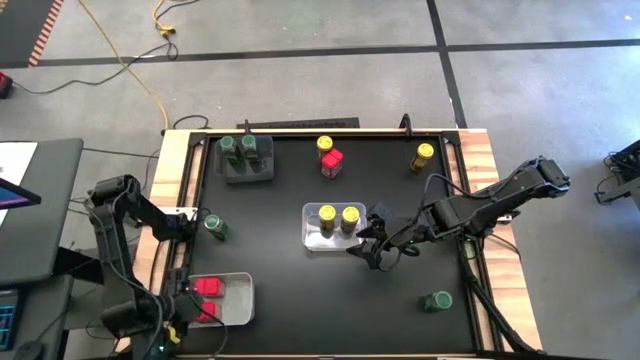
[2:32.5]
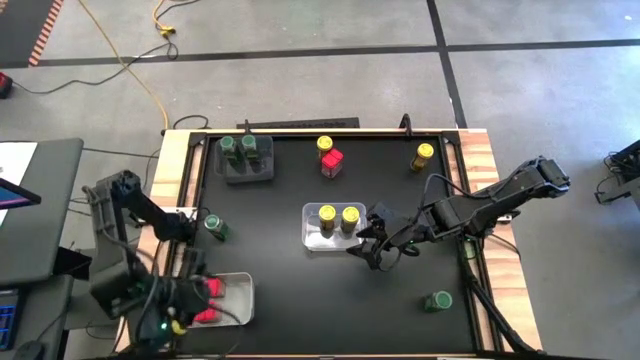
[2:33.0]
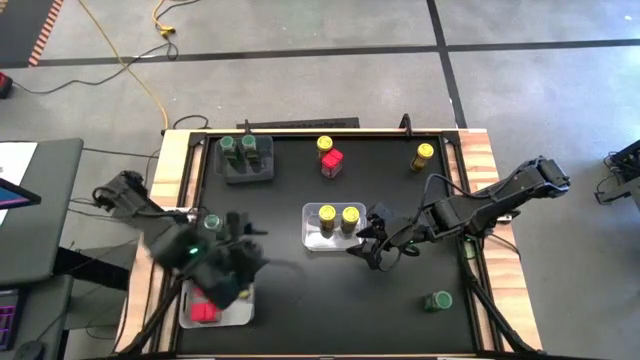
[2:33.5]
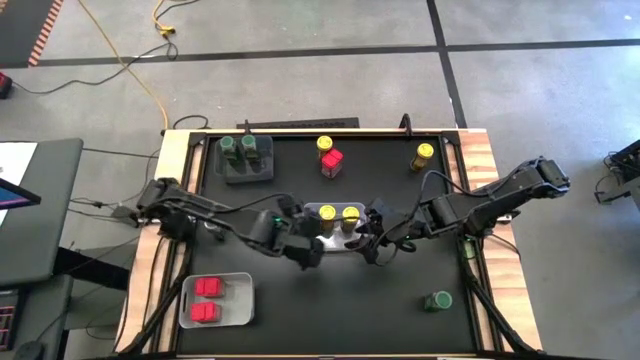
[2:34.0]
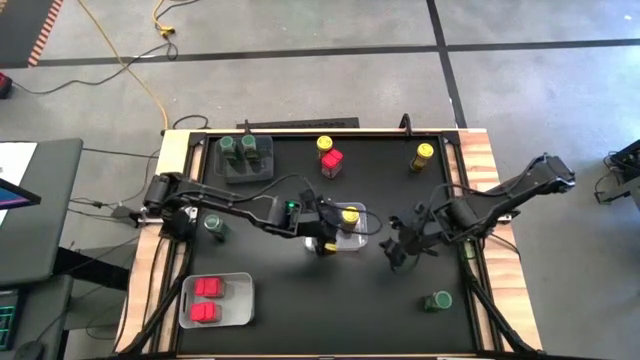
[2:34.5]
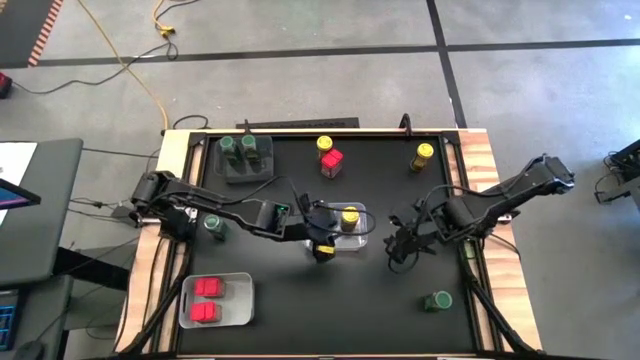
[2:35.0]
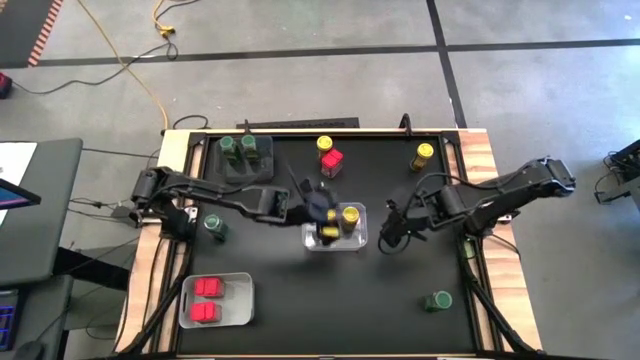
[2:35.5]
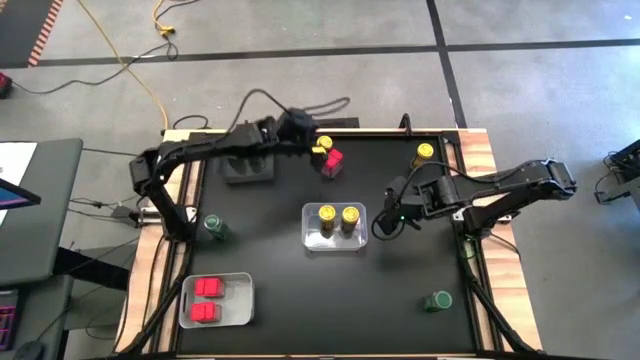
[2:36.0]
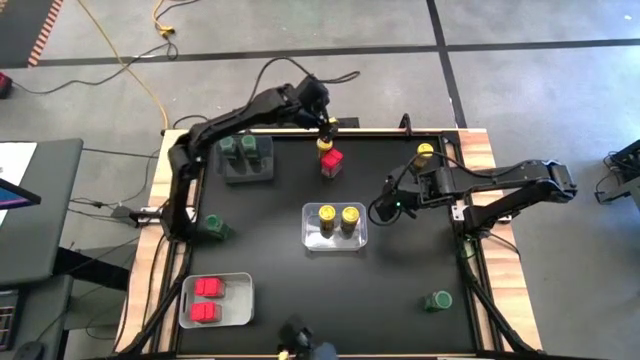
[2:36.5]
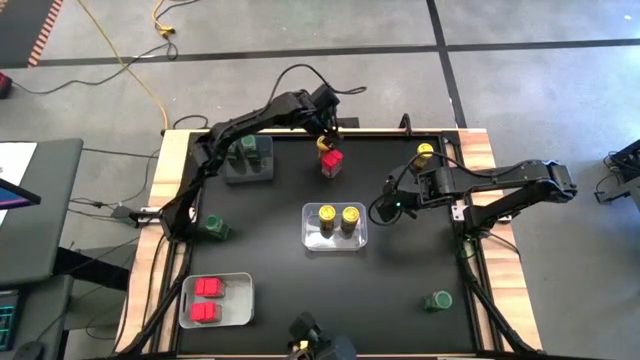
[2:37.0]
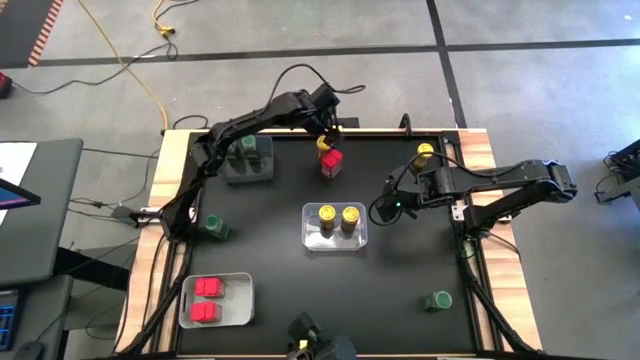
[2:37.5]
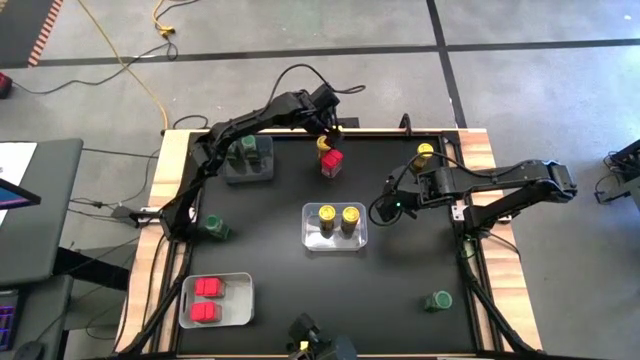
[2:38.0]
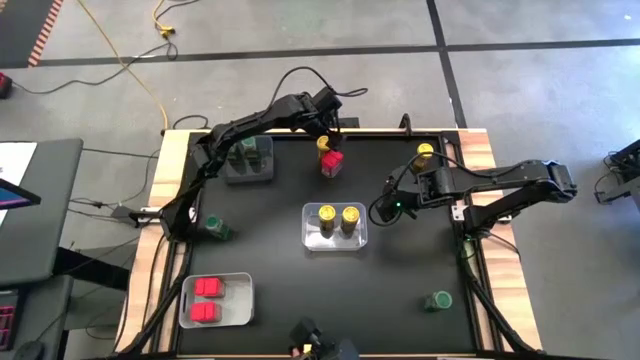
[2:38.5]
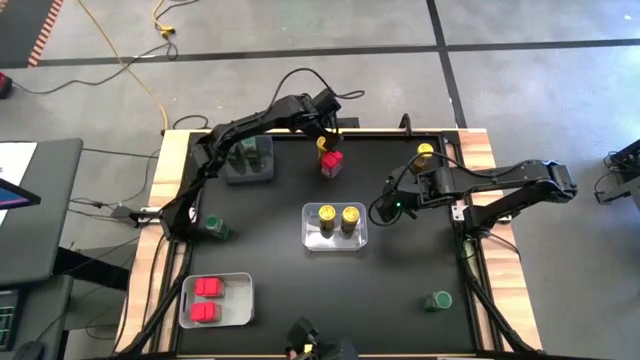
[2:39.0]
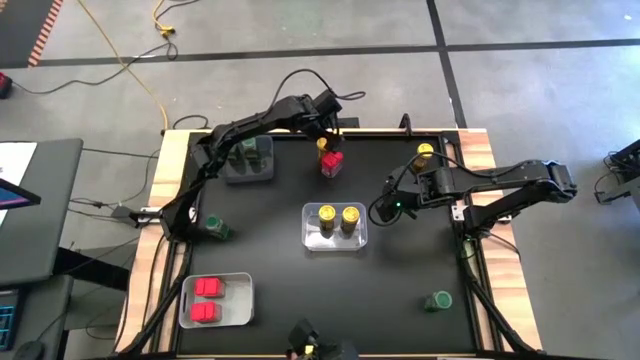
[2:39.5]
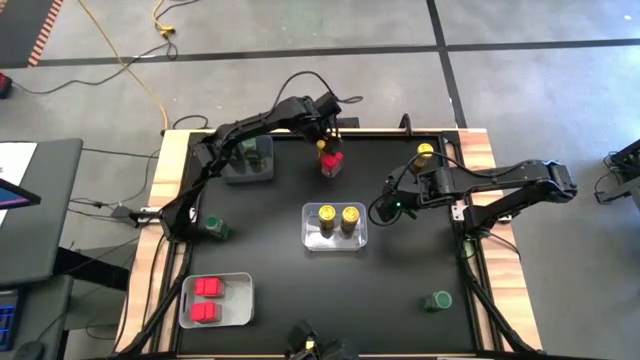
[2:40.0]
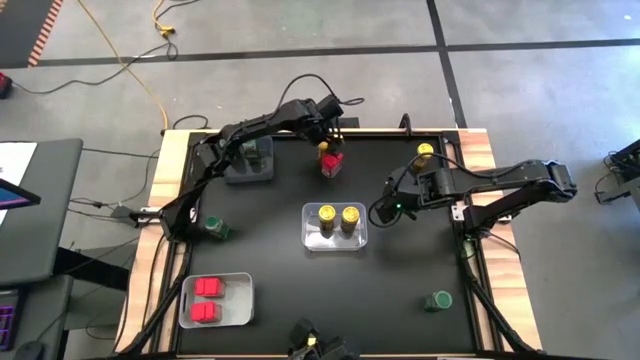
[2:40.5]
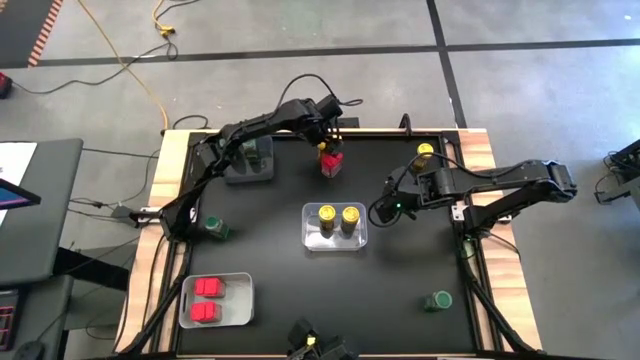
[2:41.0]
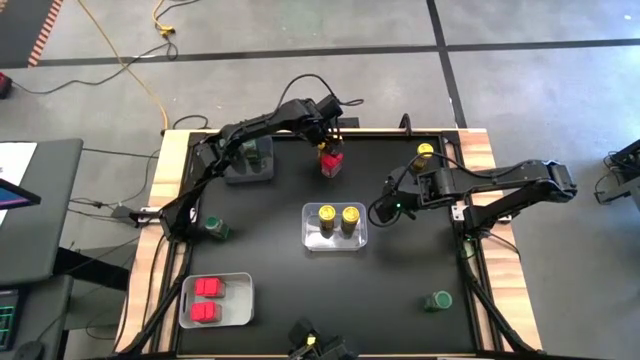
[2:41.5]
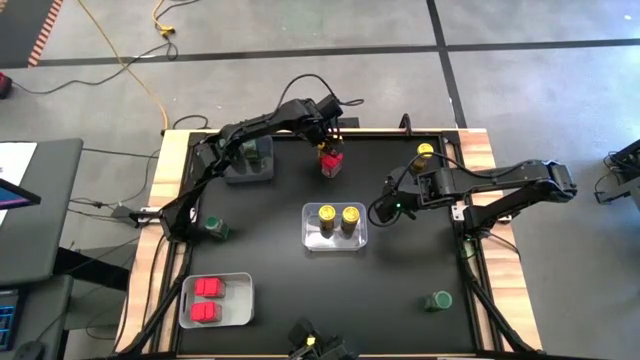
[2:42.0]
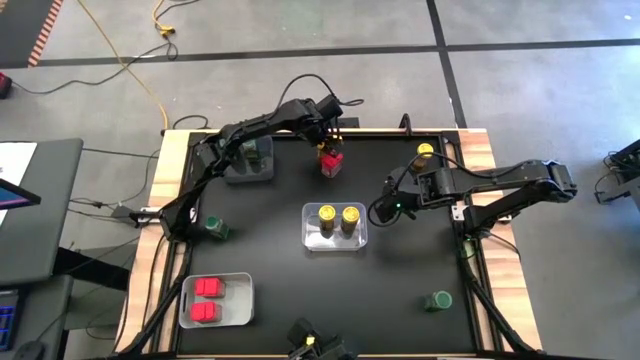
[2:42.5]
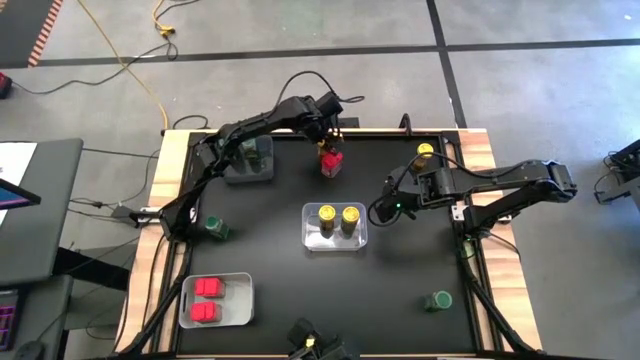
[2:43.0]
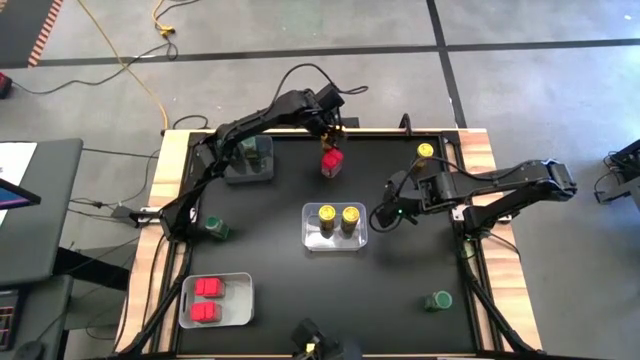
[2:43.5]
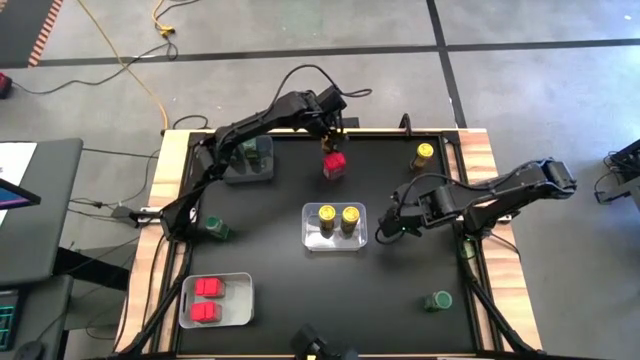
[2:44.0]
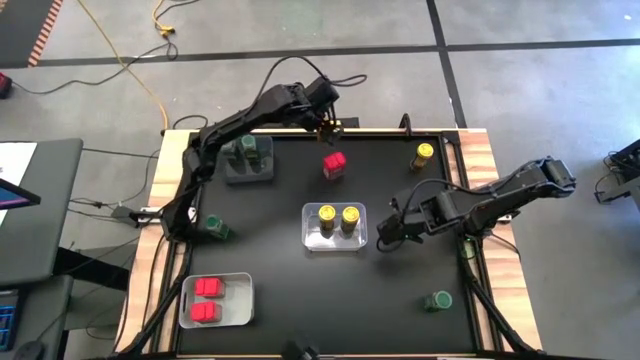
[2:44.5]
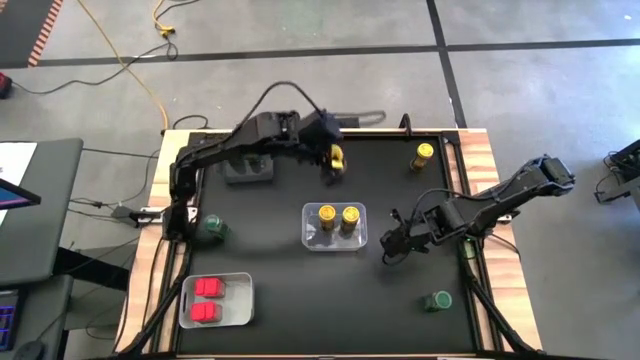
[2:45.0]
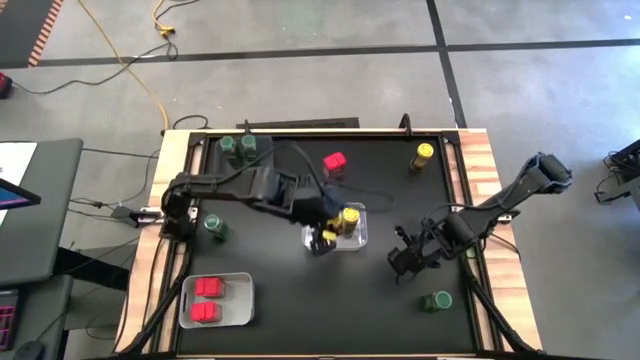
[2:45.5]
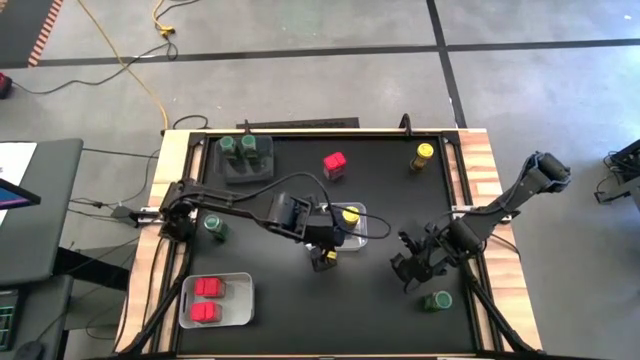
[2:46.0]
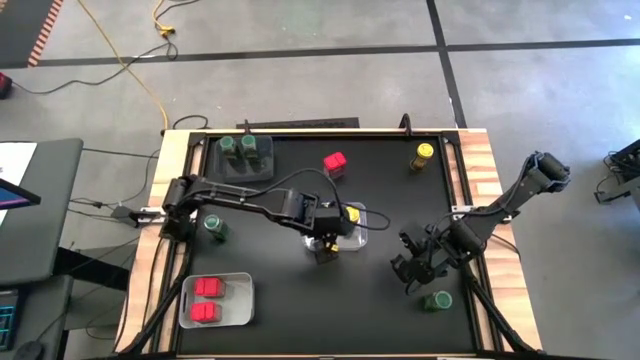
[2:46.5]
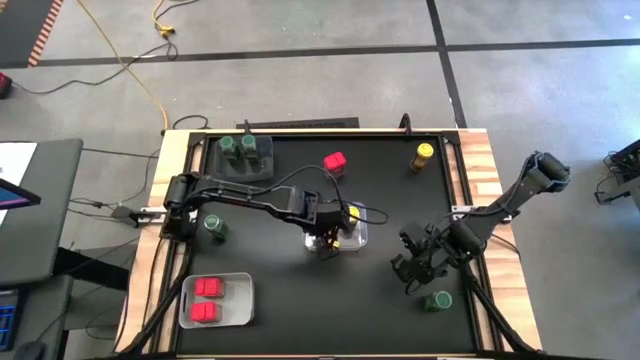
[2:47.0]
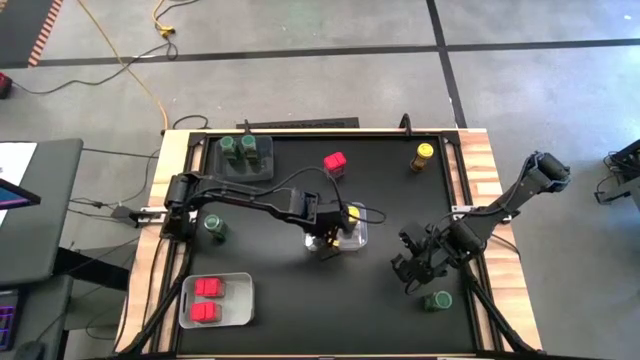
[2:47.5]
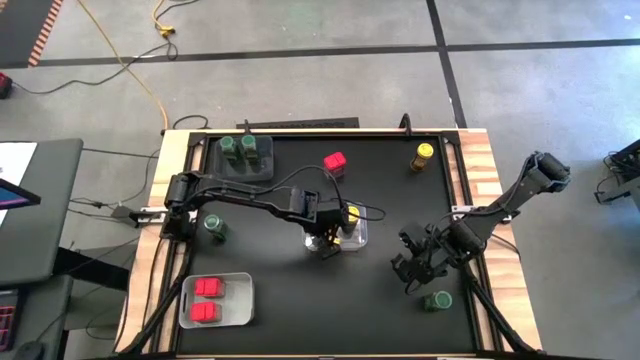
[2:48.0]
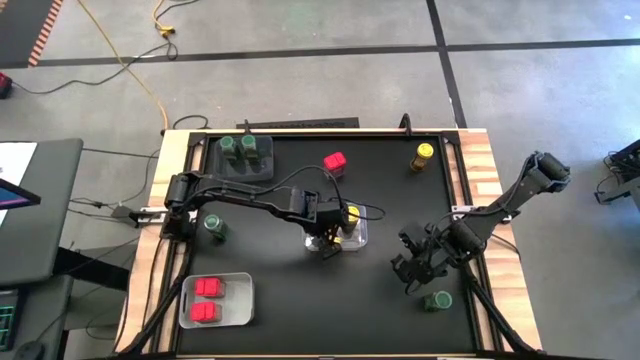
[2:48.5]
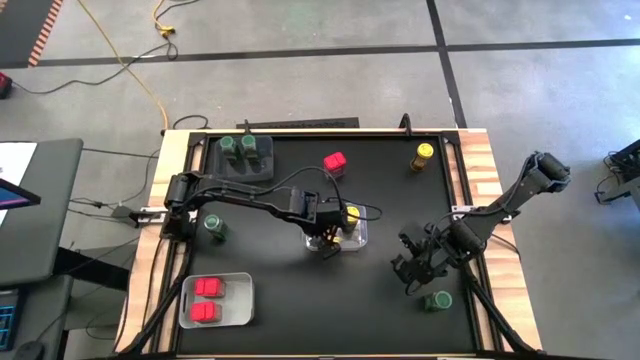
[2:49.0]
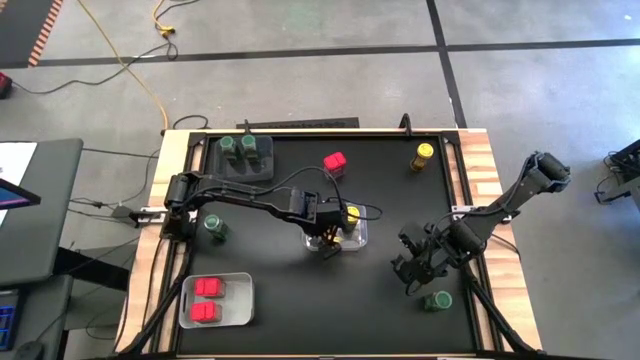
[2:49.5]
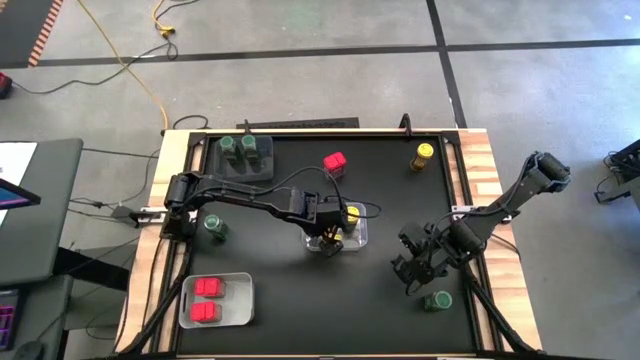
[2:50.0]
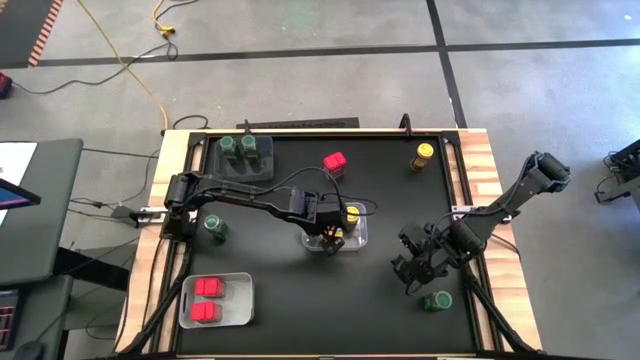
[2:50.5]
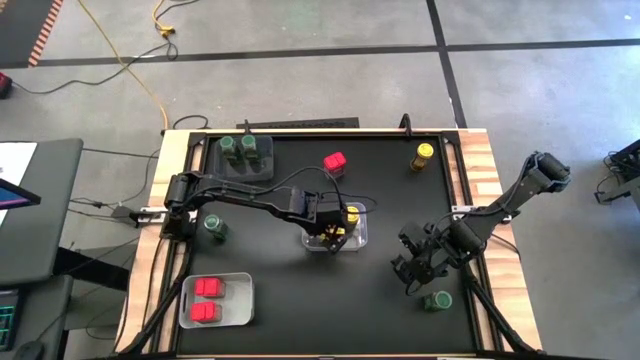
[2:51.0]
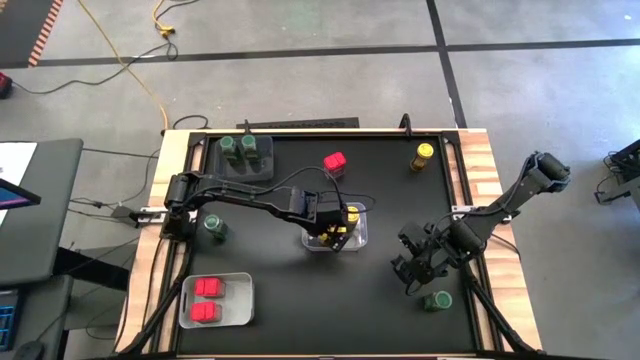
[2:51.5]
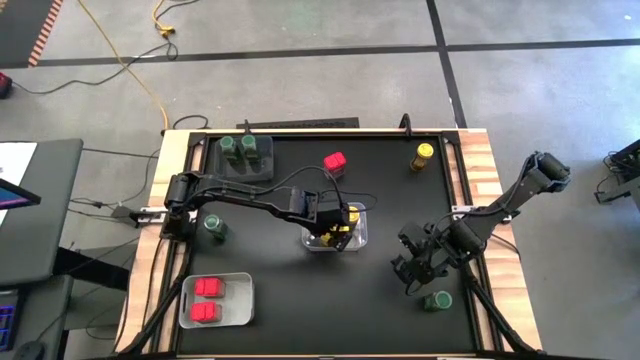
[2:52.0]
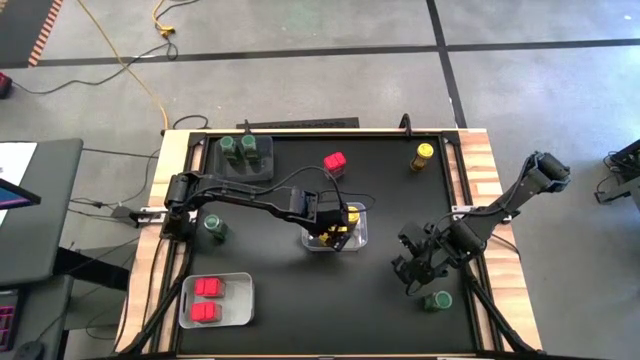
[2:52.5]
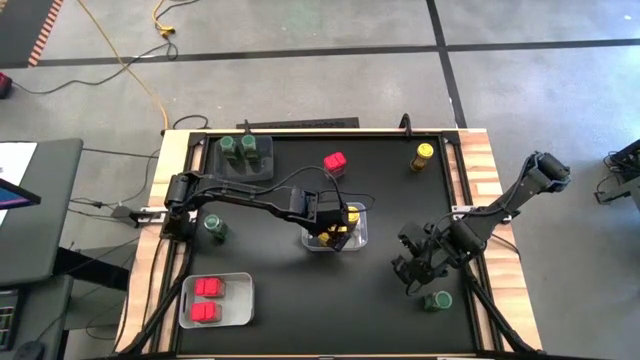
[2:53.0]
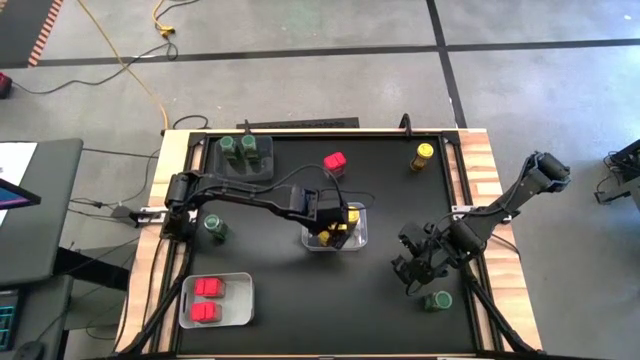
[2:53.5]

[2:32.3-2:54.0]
Task: Sort spices by type
Put the yellow seasoning bottle into the transparent bin

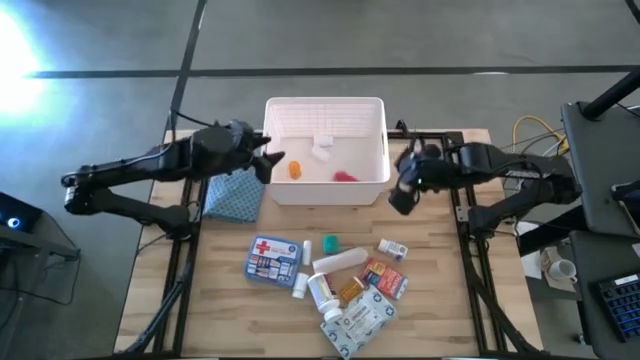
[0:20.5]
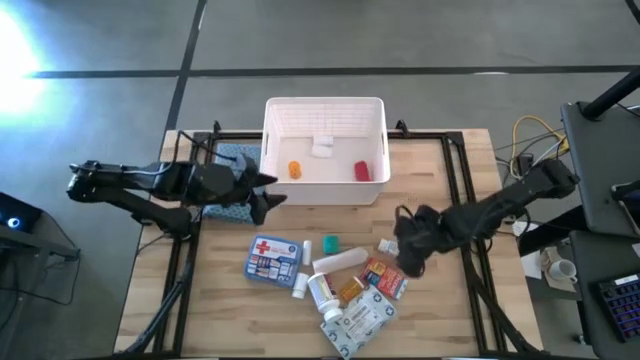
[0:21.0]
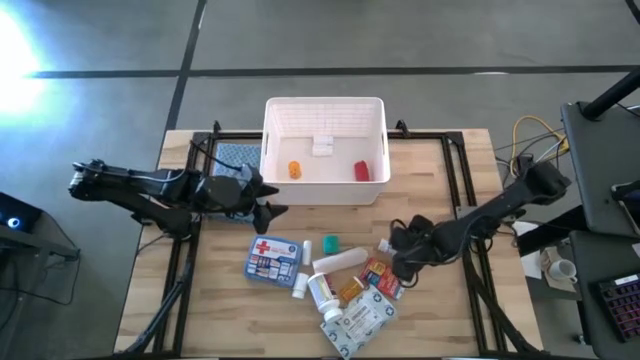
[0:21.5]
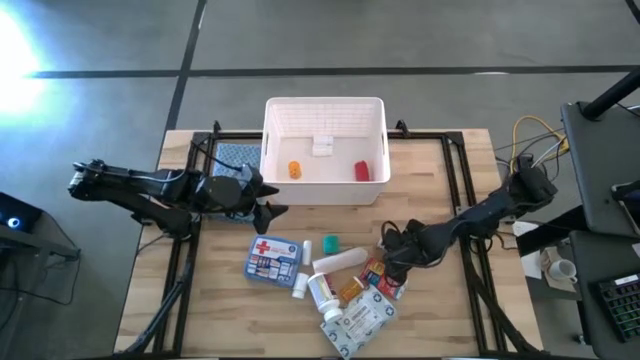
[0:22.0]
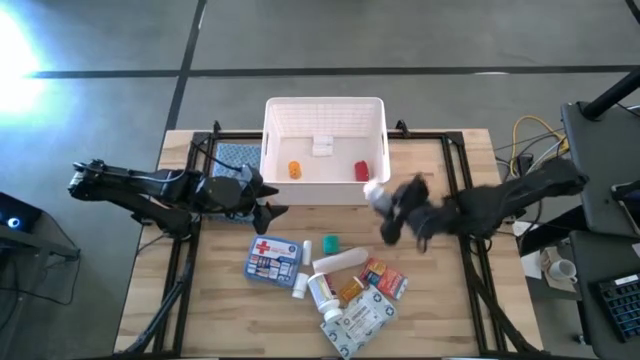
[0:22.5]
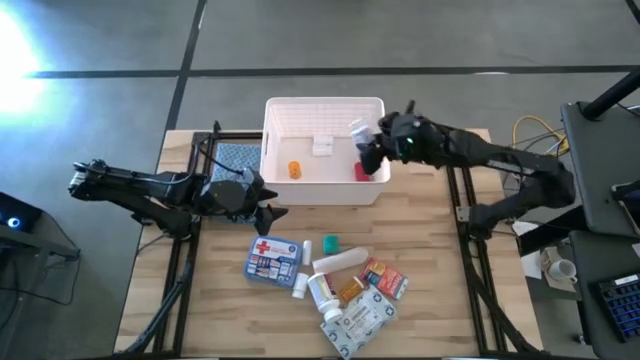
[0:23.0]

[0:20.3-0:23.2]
Task: Pick & place medical supplies in basket/bin
Put the white pill bottle into the white bin
